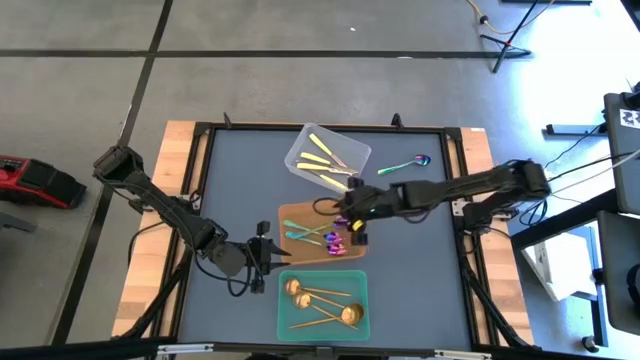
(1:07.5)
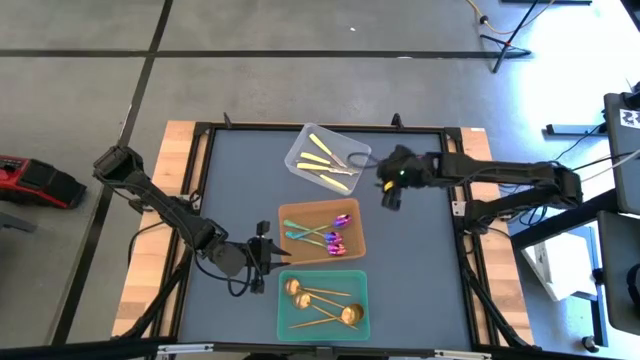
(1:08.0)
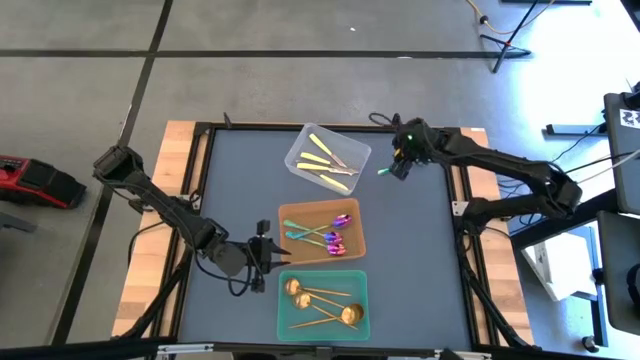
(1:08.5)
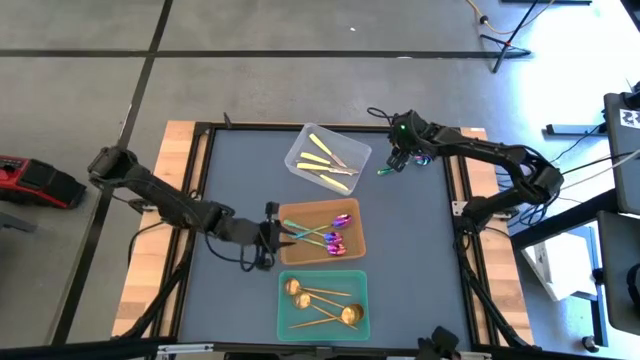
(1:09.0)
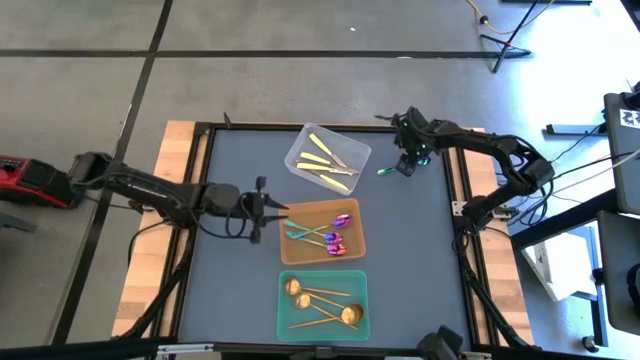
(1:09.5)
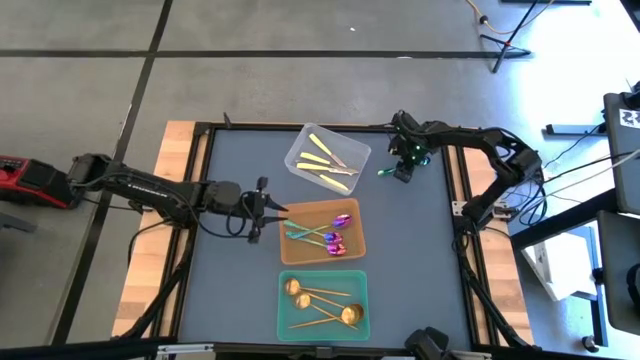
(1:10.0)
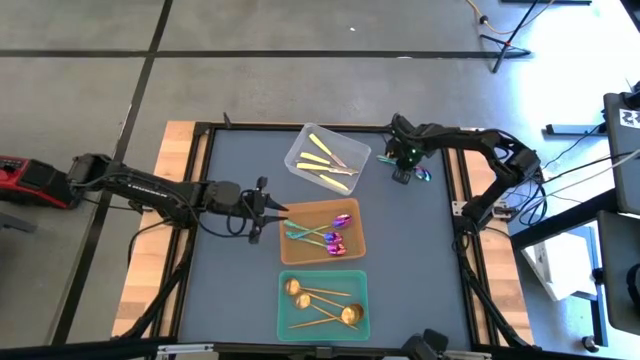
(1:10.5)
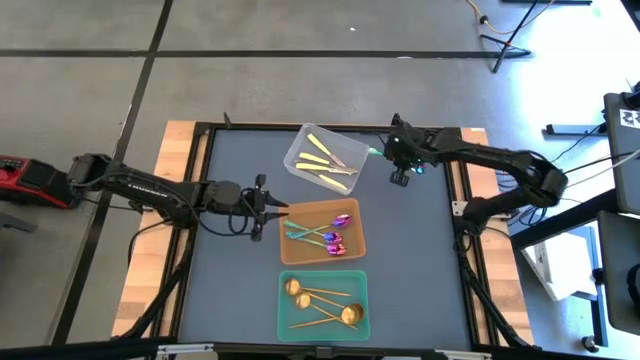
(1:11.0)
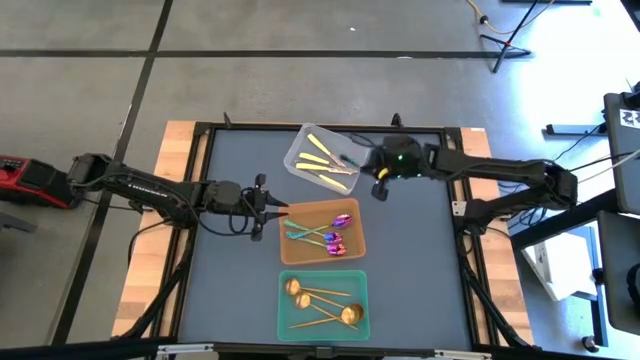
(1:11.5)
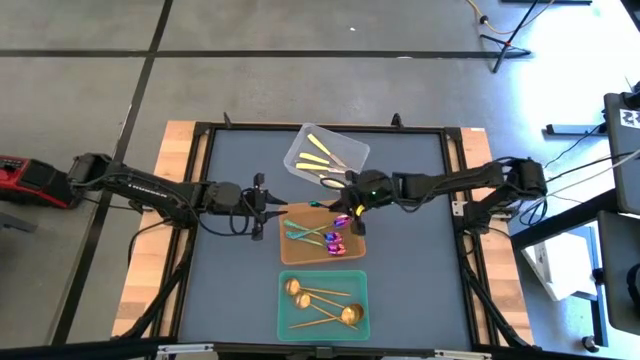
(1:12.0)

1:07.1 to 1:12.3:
Task: Sort silverware by color (type)
Put the purple spoon into the orange bin

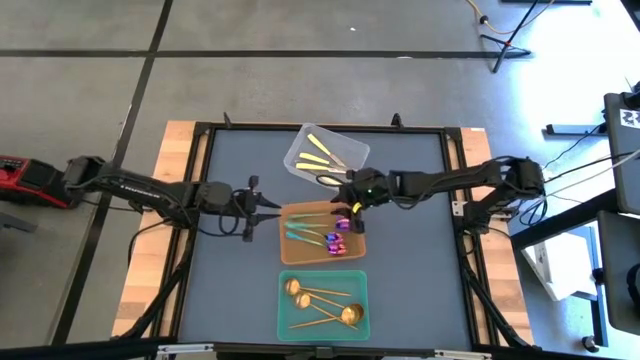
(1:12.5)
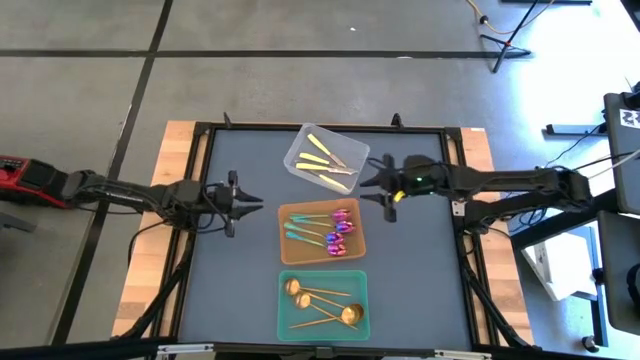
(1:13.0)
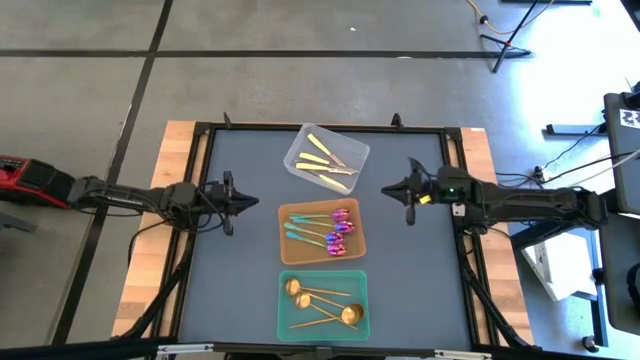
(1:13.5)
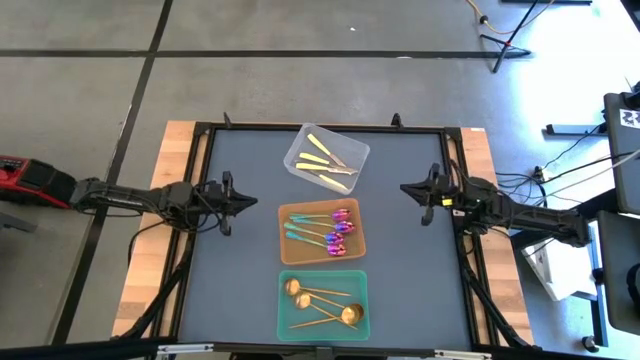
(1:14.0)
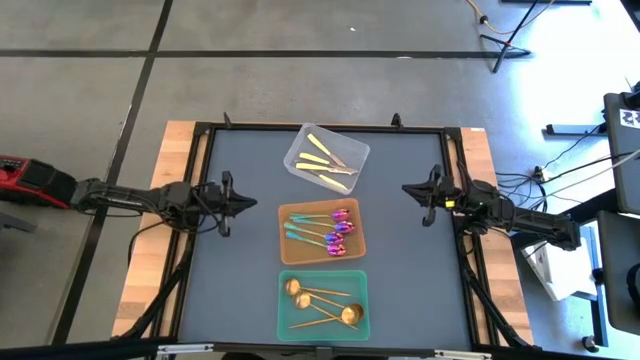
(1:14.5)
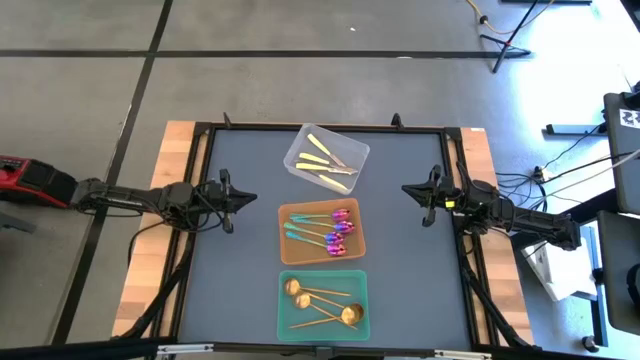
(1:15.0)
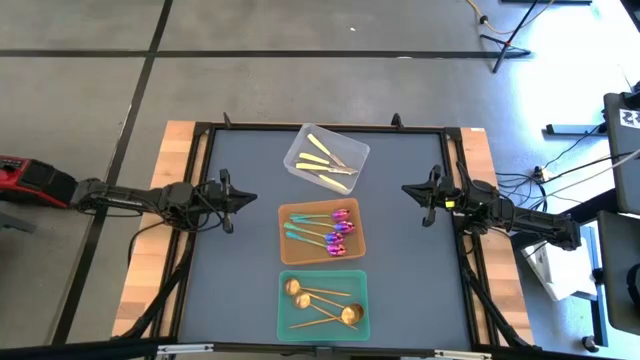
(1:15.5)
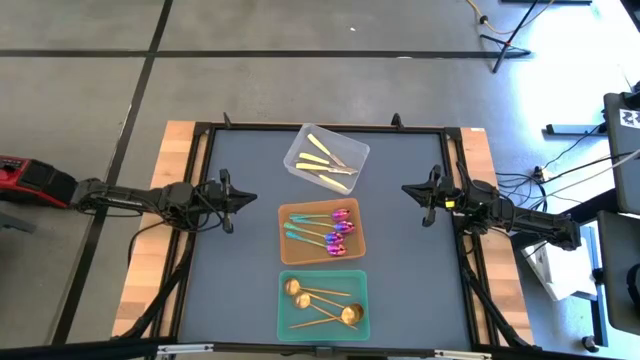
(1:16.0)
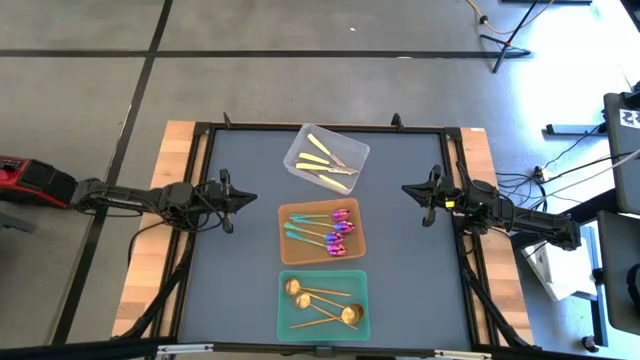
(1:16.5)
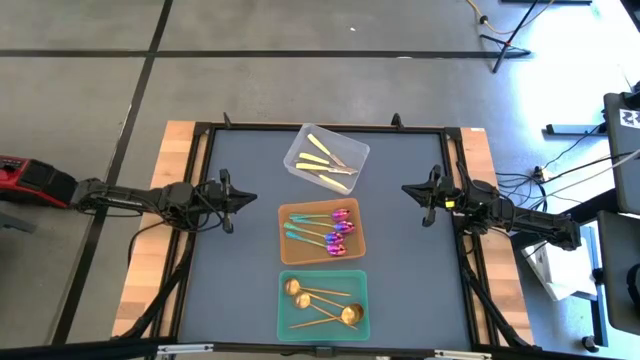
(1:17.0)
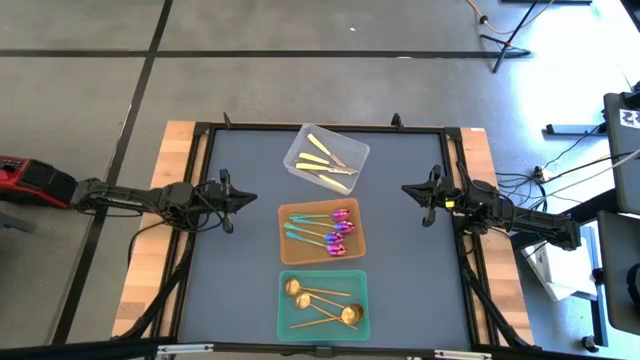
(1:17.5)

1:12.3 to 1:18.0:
Return to Home Position

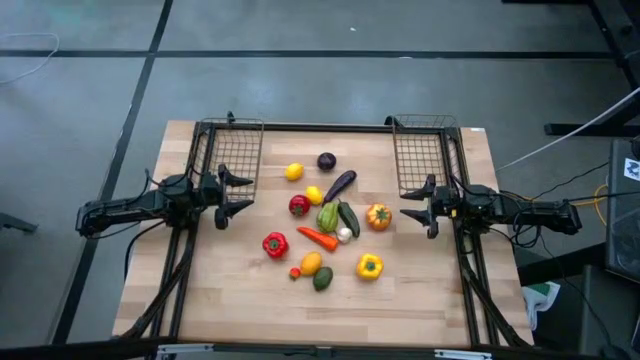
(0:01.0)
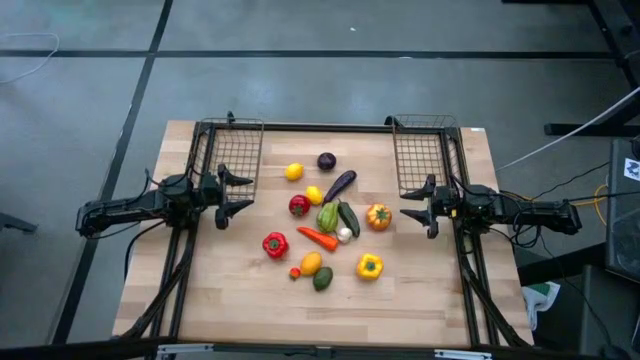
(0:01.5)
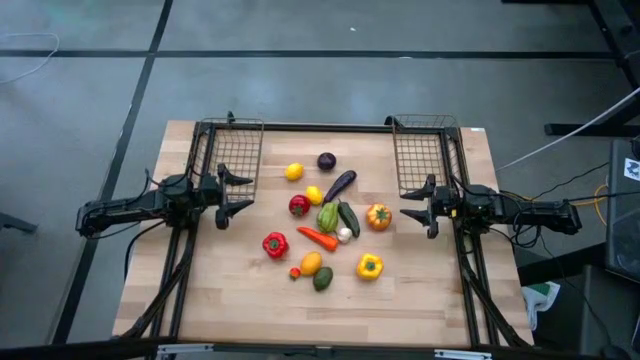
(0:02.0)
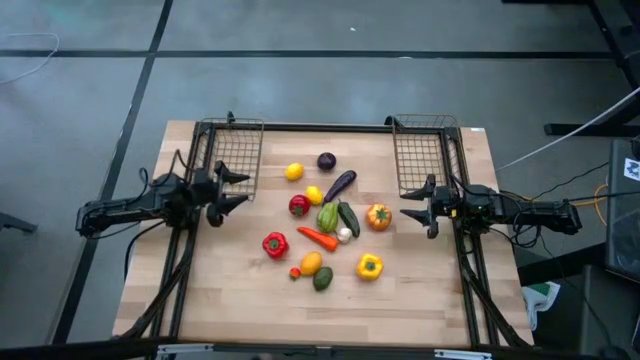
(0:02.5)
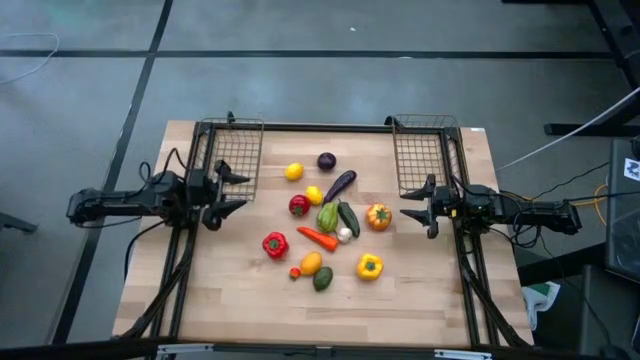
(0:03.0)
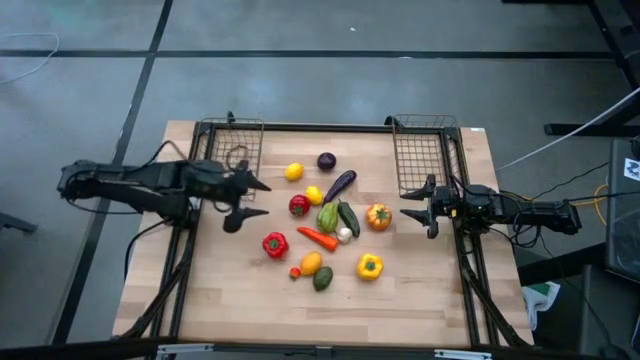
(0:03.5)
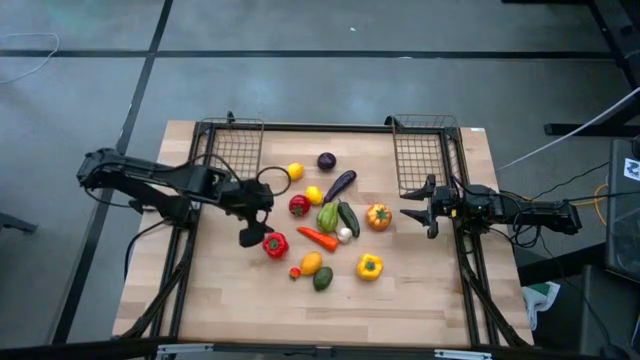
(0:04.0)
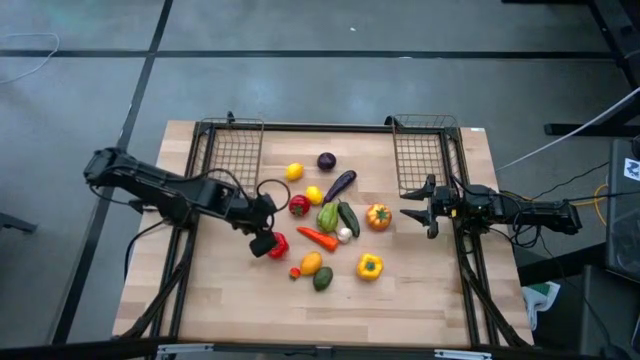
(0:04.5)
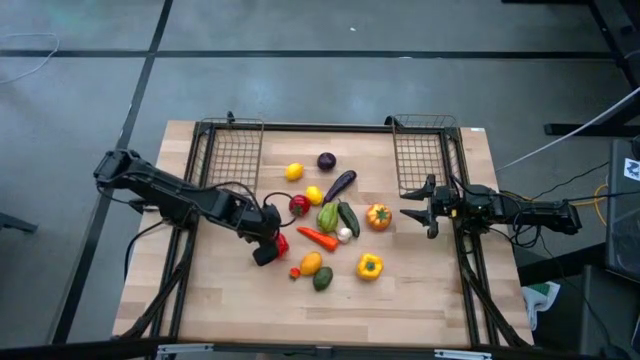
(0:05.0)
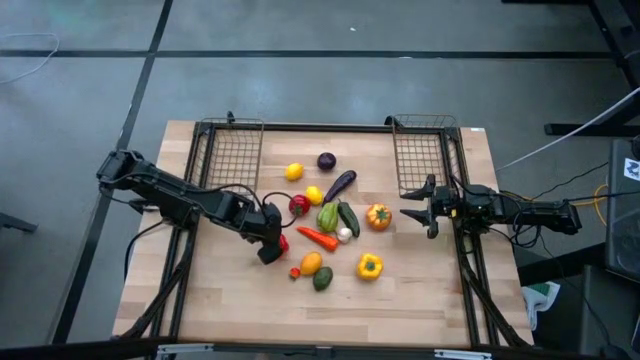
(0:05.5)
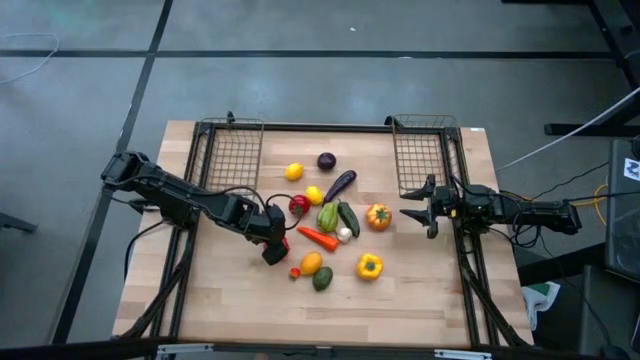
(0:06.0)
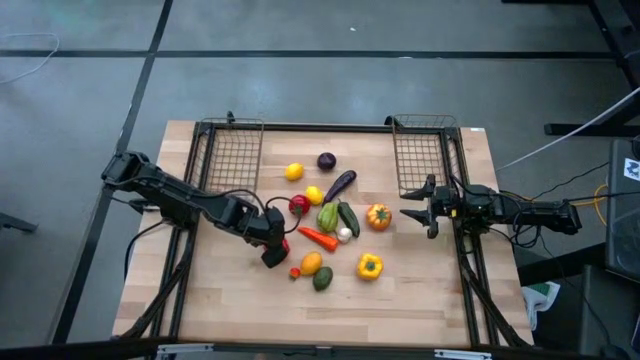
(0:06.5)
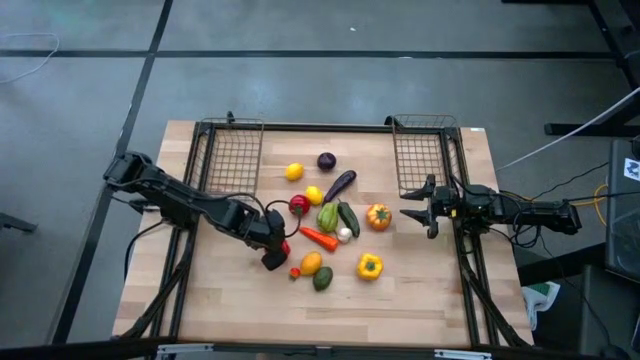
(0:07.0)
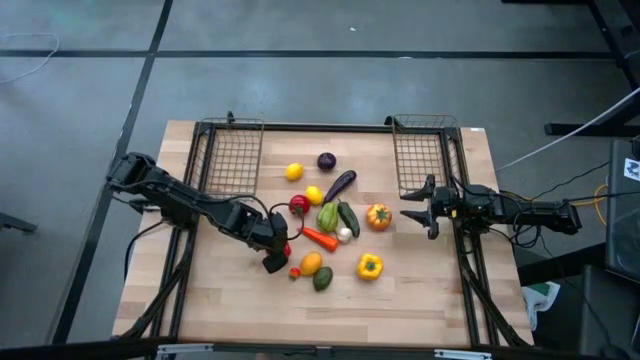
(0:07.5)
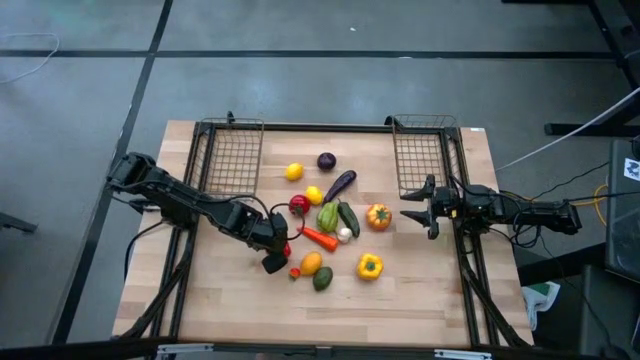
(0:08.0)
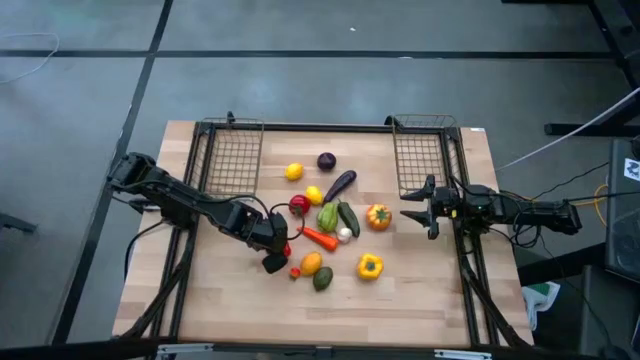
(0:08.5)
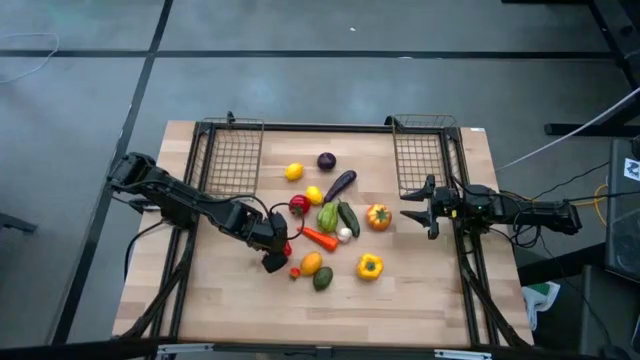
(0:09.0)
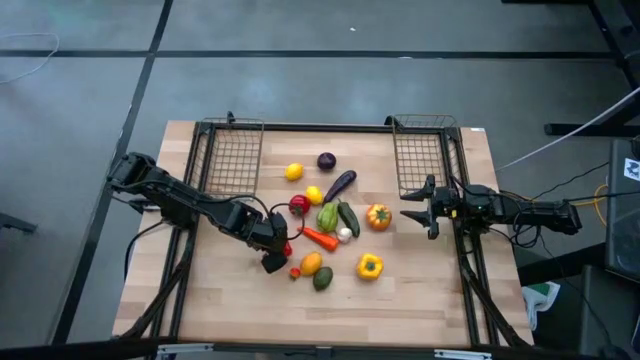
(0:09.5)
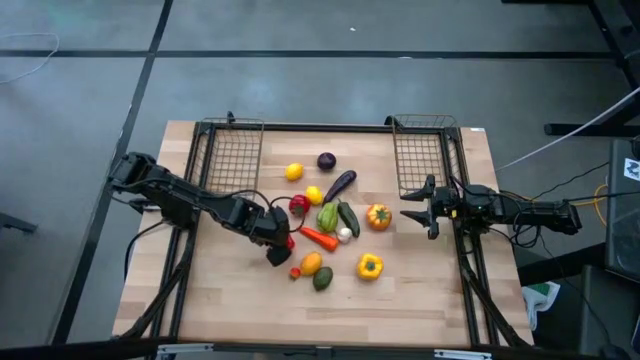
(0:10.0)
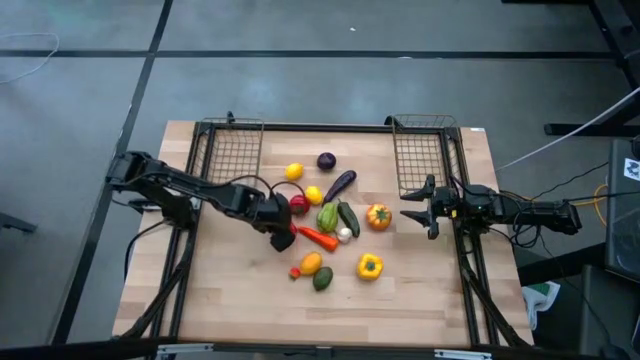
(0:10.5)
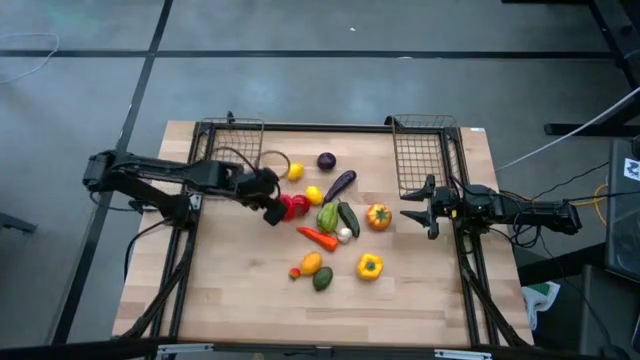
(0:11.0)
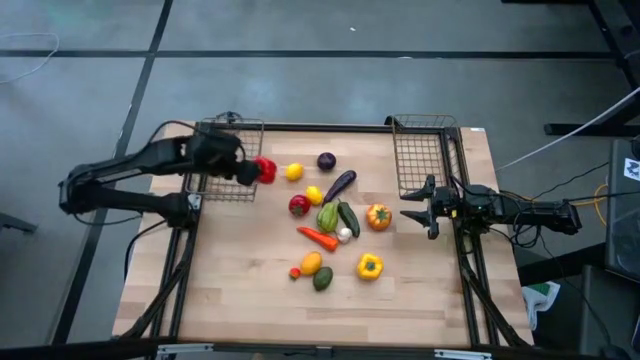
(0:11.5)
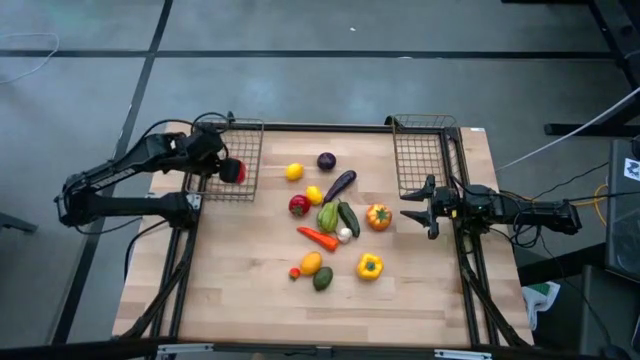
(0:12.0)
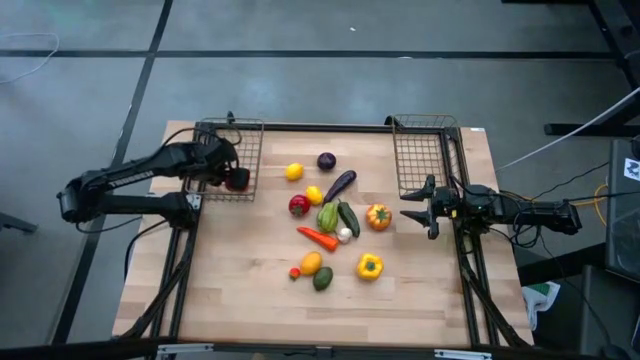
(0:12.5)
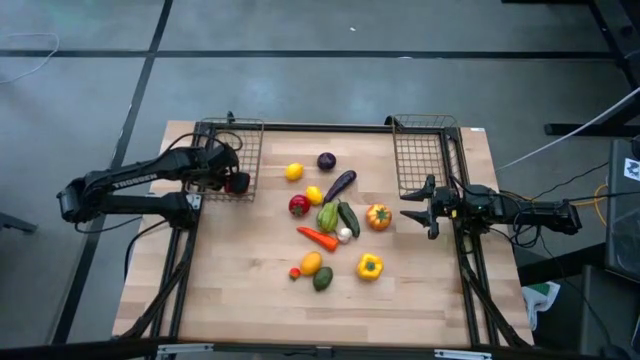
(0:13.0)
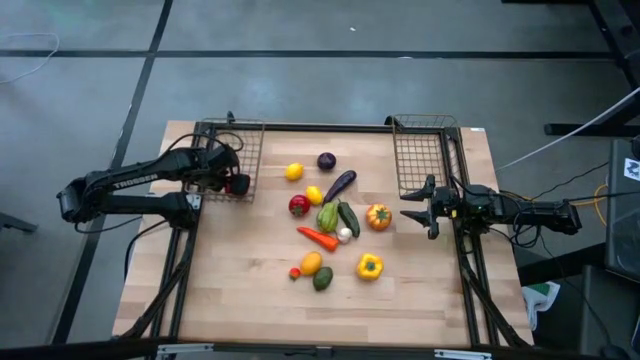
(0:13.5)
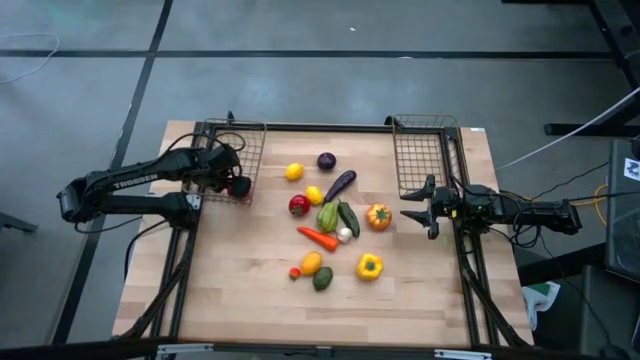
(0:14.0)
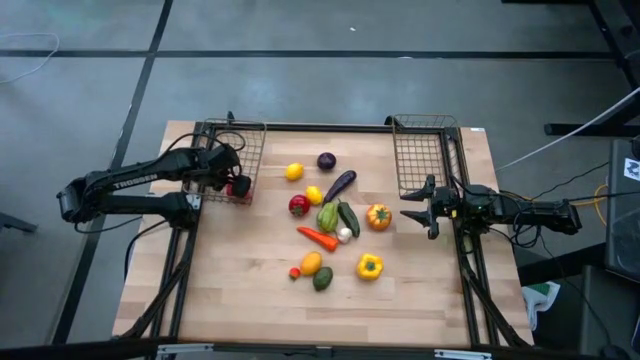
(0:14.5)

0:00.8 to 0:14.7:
Task: Sort produce into baskets
Put the red bell pepper into the left gold wire basket
